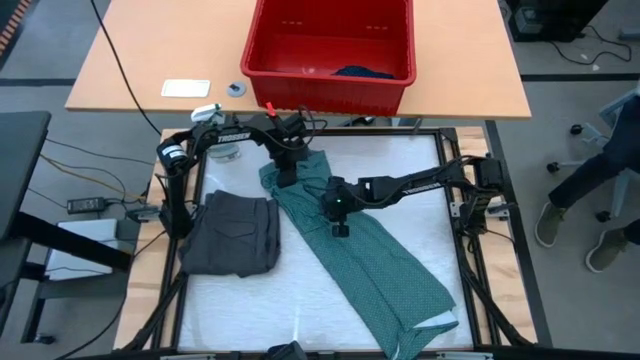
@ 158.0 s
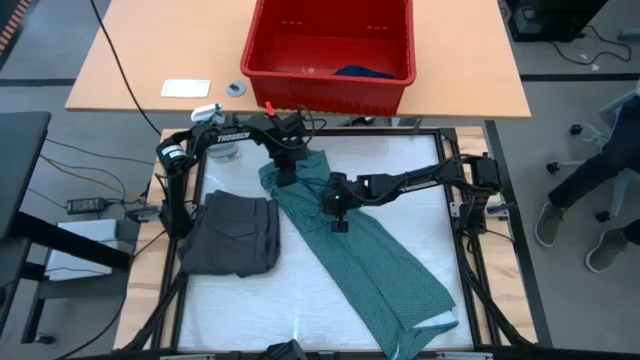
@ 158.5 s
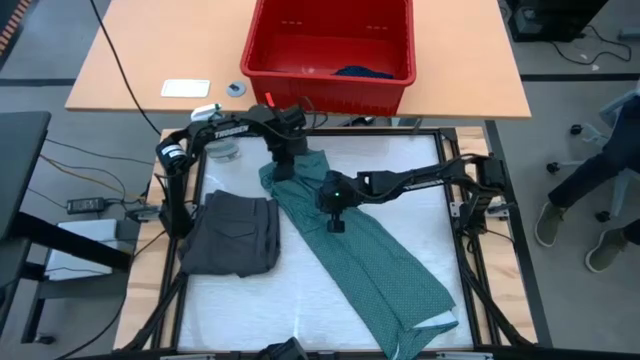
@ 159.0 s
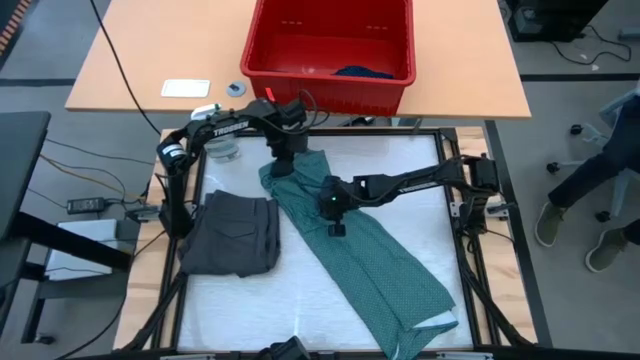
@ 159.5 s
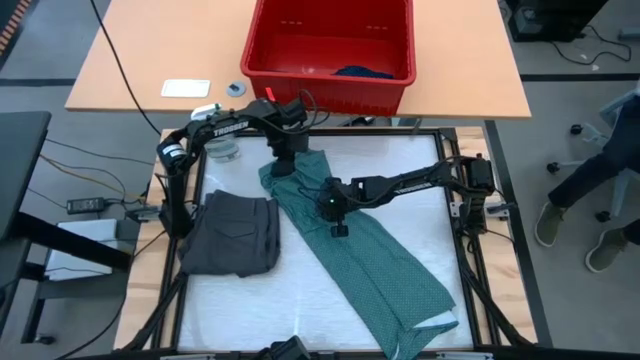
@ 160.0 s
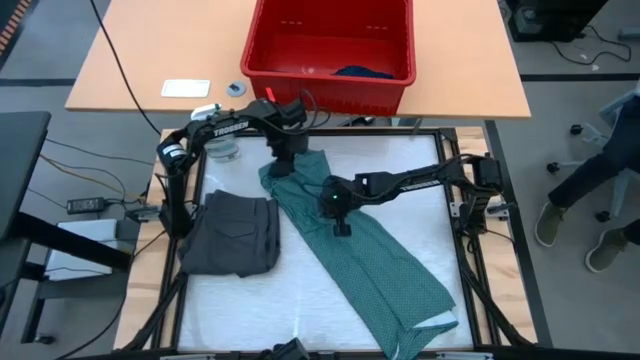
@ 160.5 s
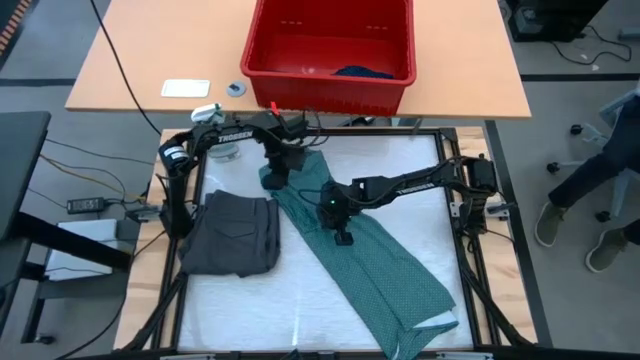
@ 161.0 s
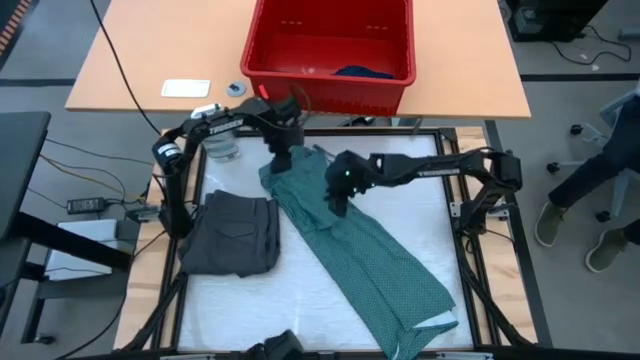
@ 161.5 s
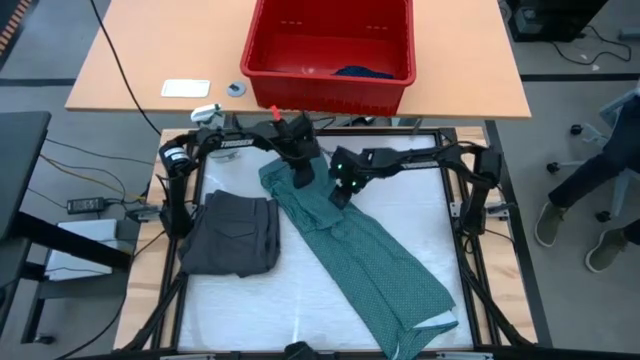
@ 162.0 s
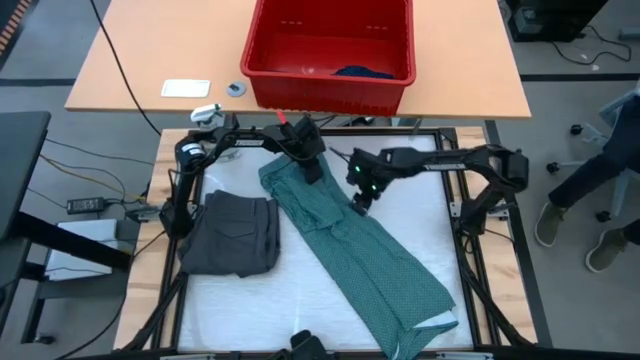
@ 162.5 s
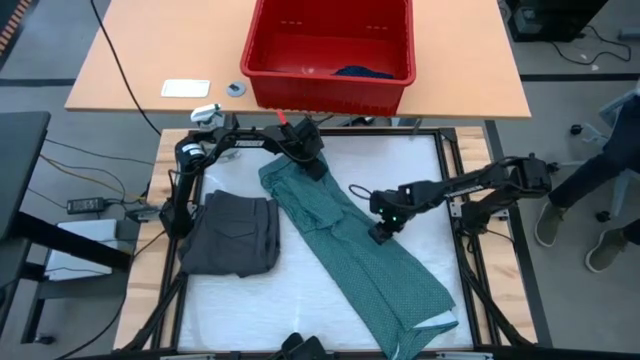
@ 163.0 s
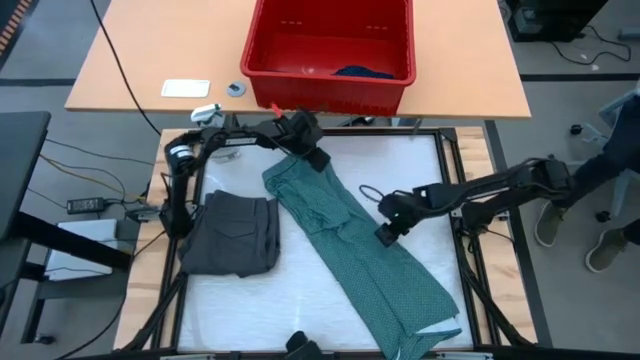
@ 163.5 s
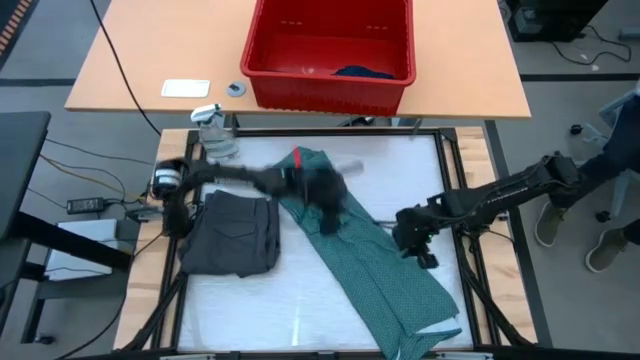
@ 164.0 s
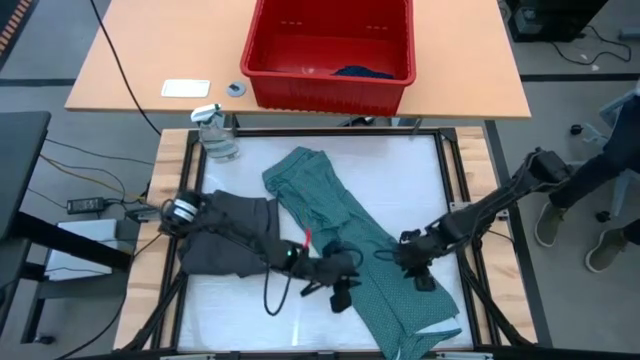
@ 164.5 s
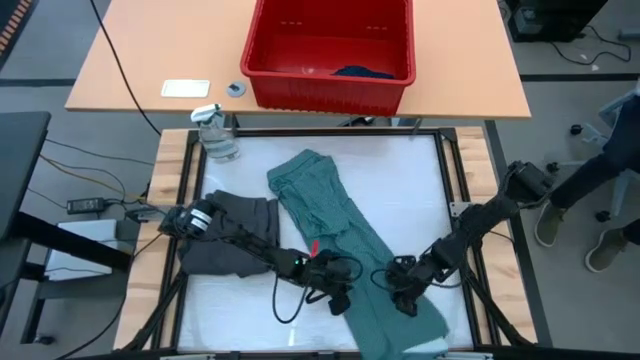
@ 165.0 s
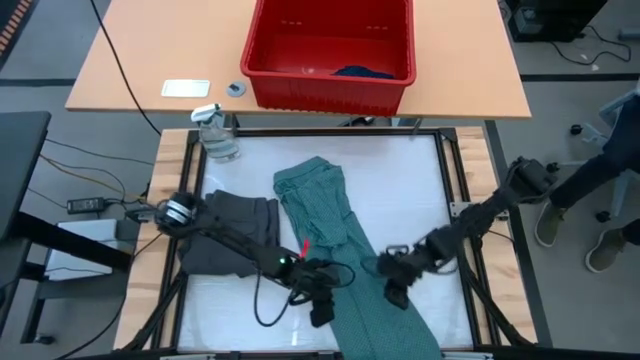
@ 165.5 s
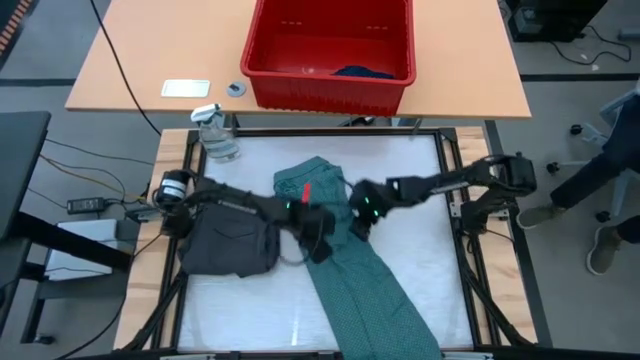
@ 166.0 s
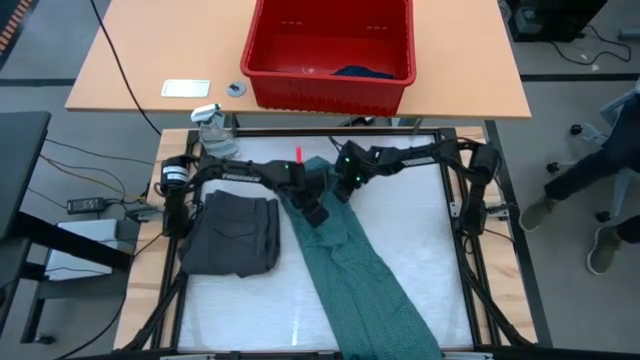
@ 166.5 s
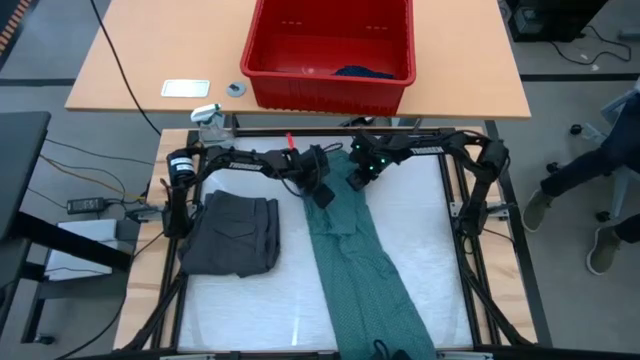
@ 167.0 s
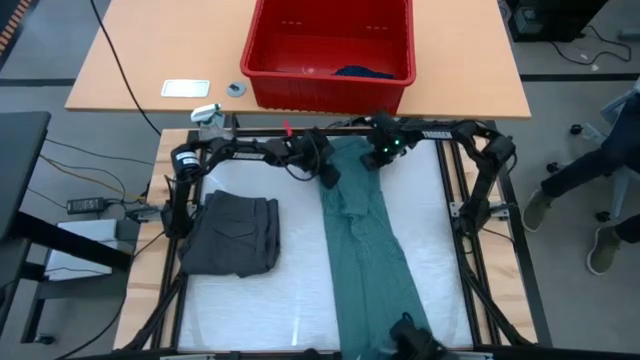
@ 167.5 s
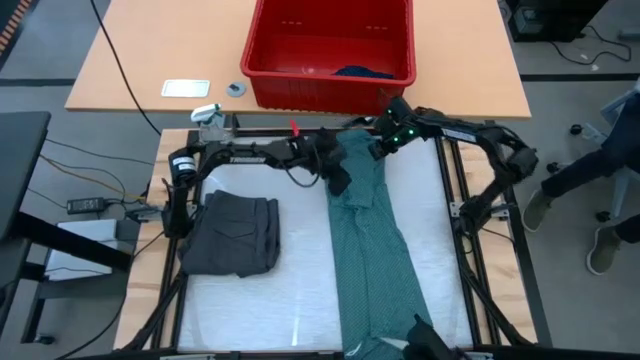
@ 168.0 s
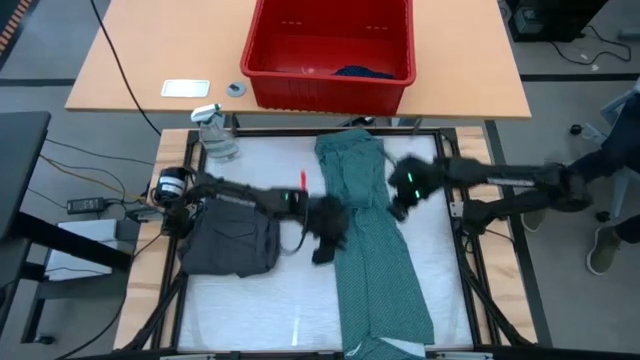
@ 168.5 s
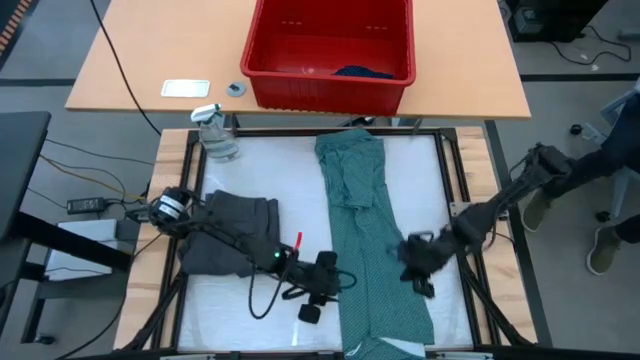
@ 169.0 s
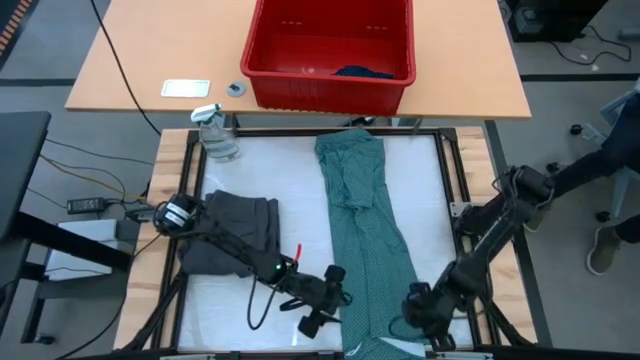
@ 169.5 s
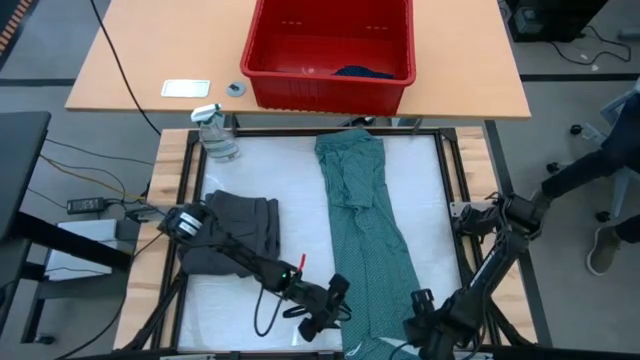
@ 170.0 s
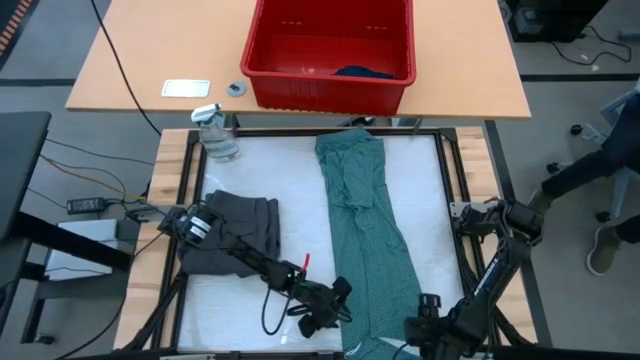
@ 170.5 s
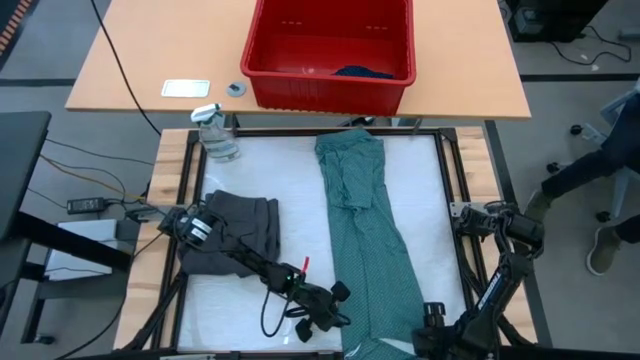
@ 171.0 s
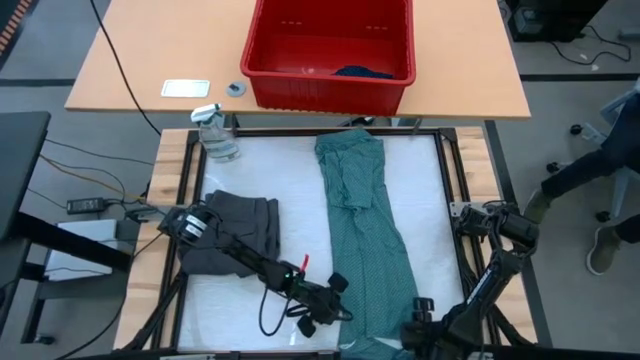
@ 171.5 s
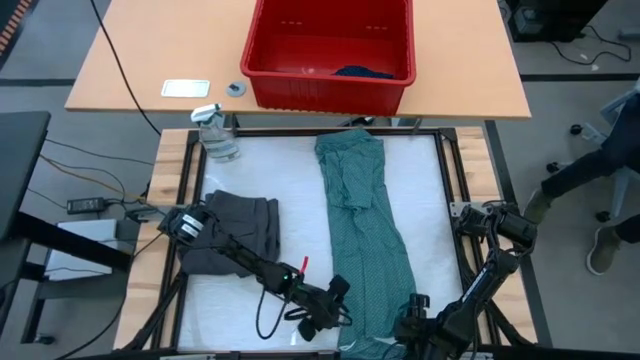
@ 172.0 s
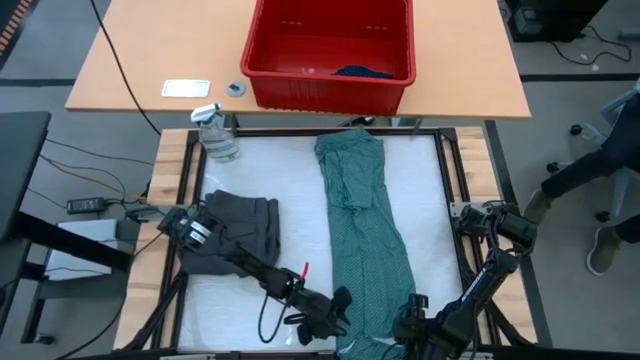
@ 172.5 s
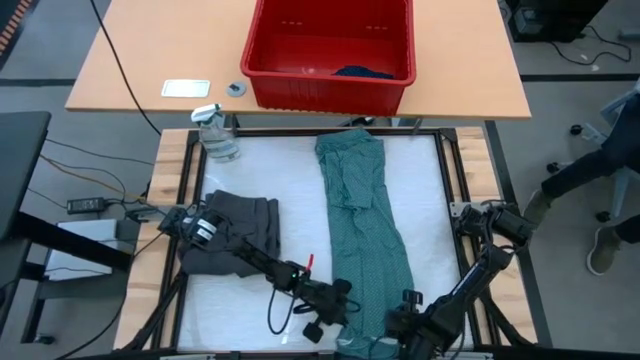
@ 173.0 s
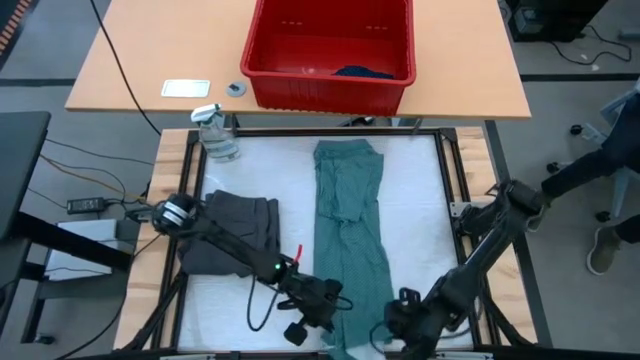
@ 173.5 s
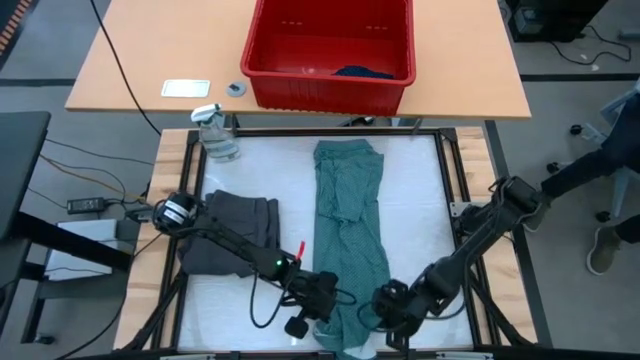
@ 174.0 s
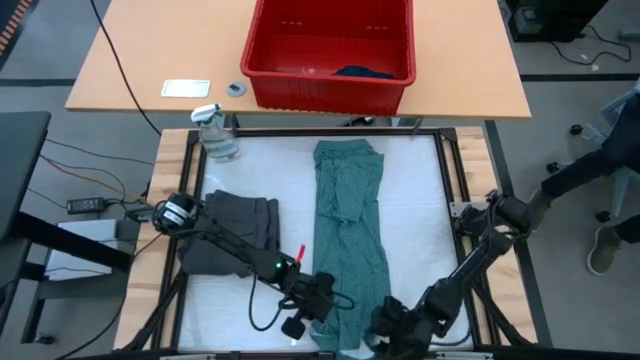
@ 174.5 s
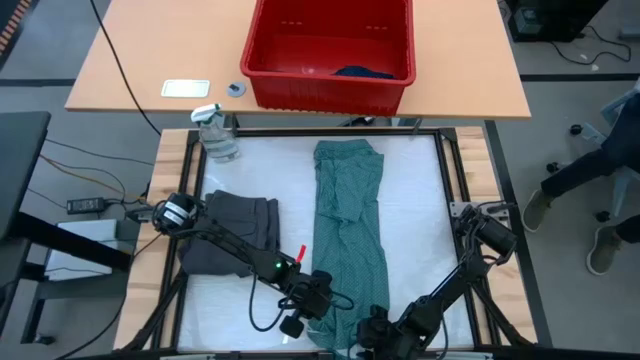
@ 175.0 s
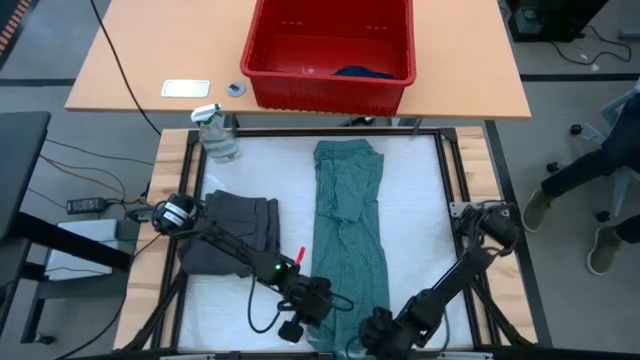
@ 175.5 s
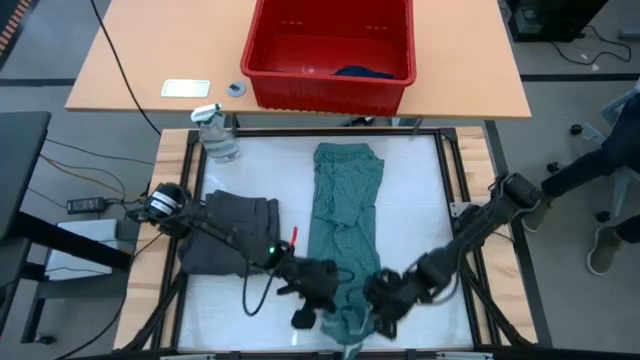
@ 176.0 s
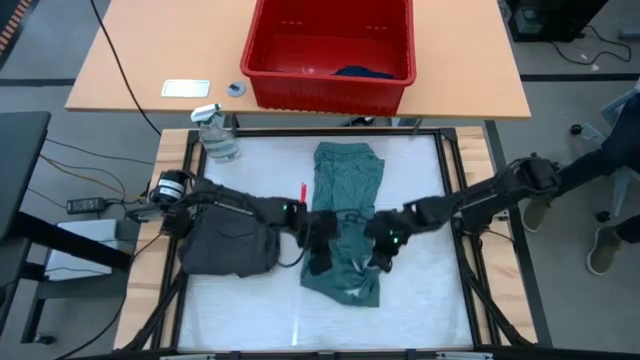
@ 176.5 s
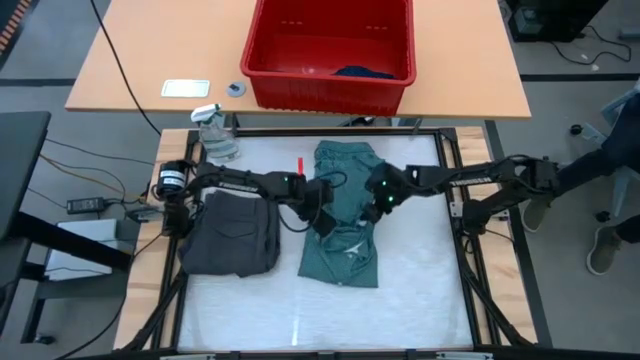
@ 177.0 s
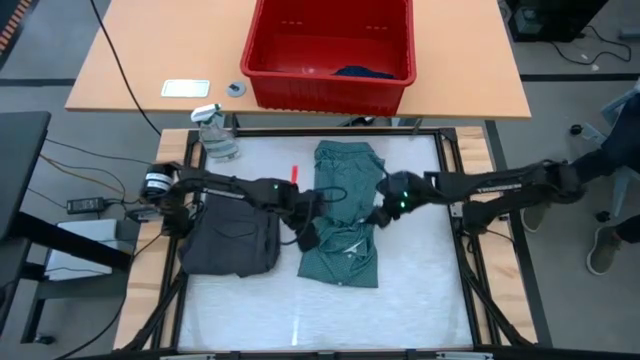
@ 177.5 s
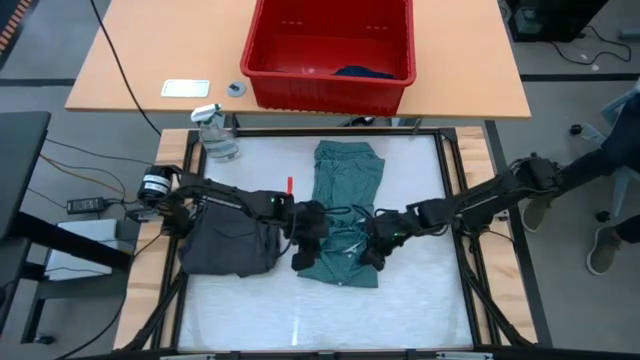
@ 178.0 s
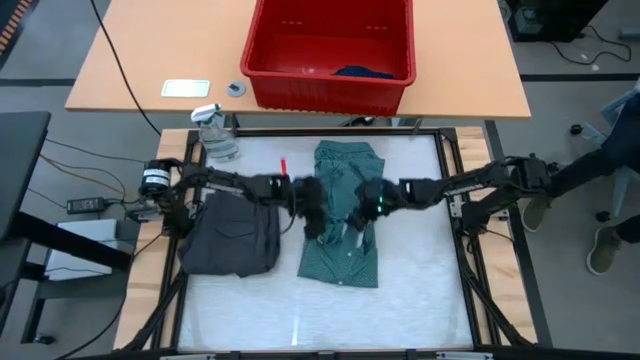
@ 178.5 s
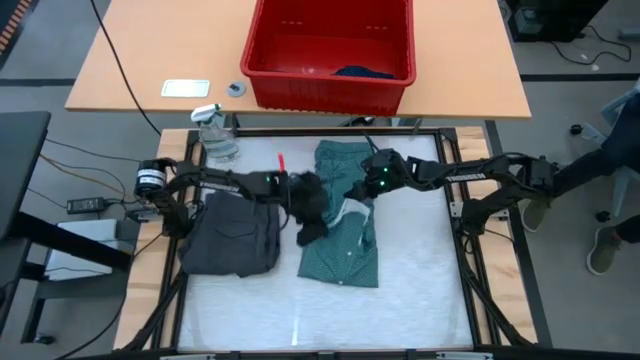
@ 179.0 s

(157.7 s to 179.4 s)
Task: Fold Laundry from Bin
Fold the green polo shirt on the table
